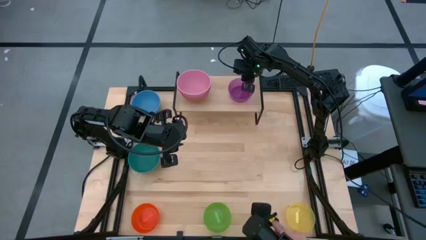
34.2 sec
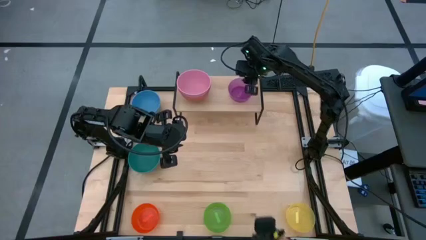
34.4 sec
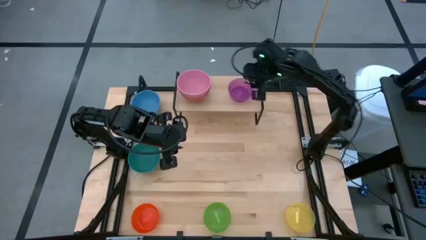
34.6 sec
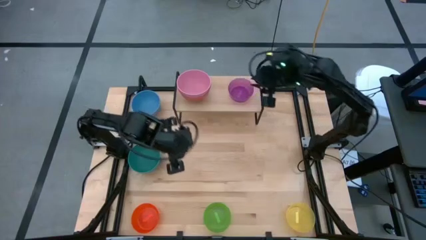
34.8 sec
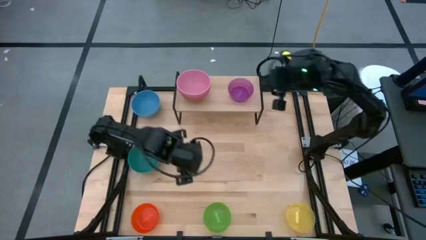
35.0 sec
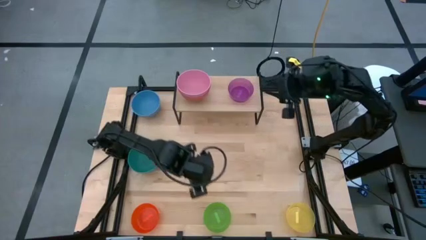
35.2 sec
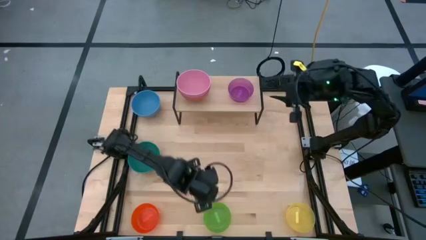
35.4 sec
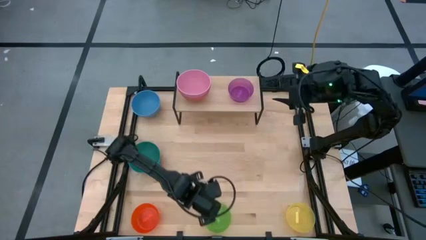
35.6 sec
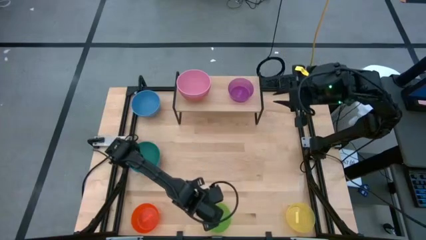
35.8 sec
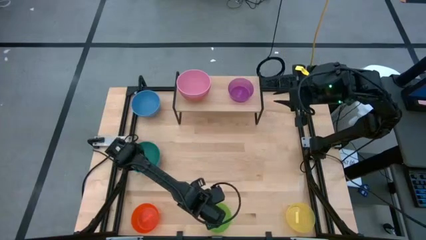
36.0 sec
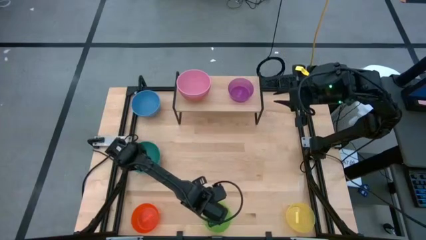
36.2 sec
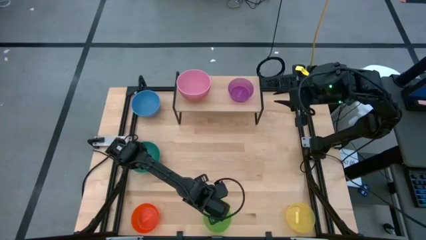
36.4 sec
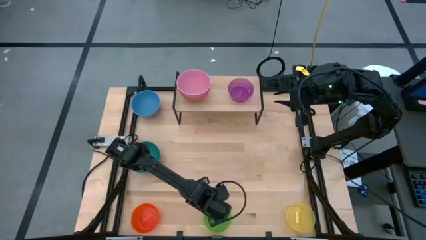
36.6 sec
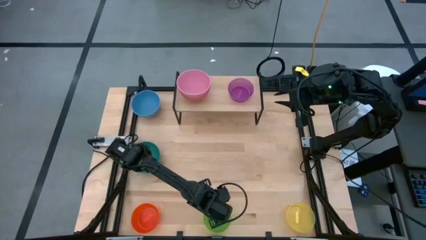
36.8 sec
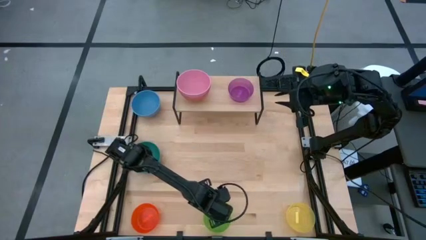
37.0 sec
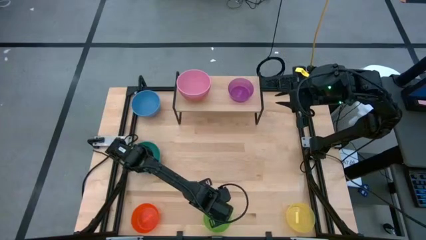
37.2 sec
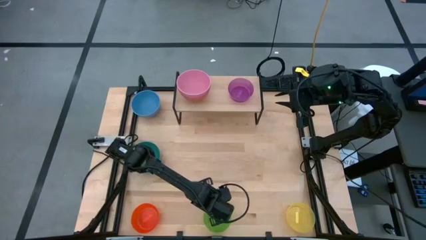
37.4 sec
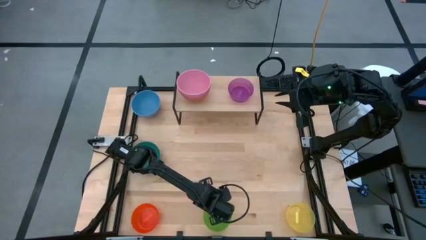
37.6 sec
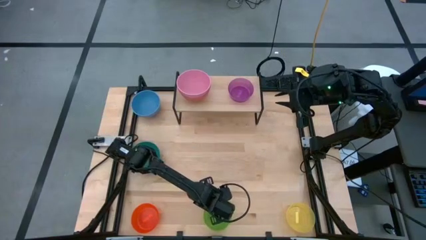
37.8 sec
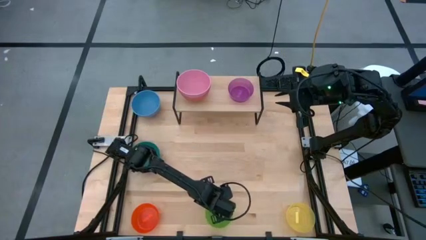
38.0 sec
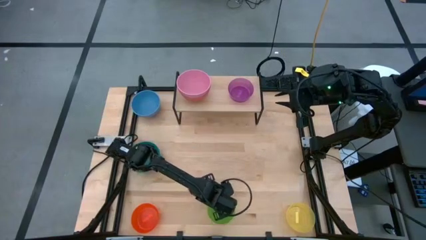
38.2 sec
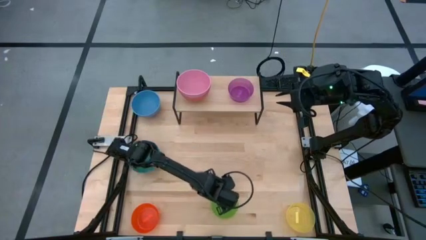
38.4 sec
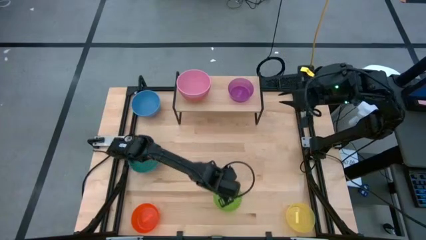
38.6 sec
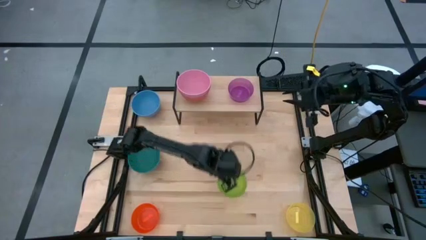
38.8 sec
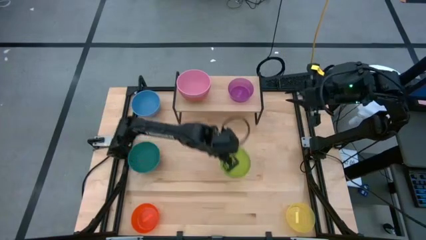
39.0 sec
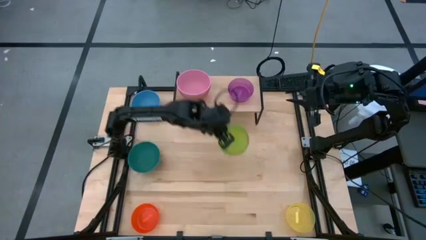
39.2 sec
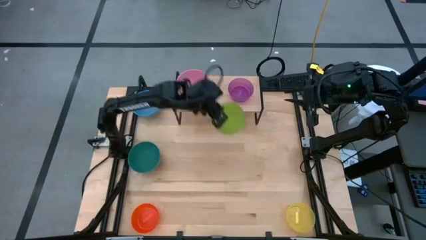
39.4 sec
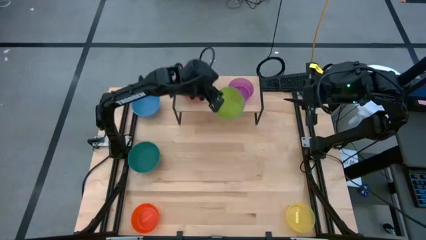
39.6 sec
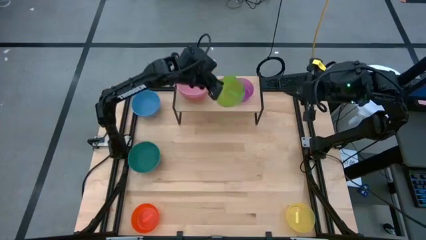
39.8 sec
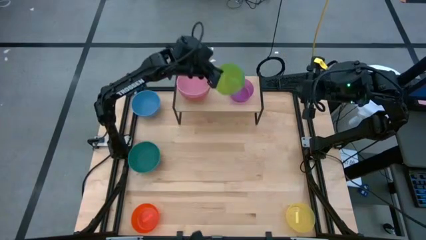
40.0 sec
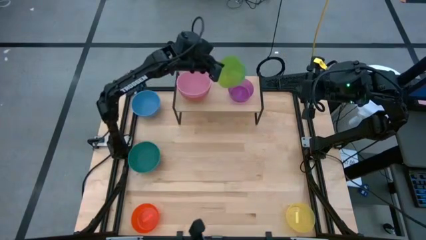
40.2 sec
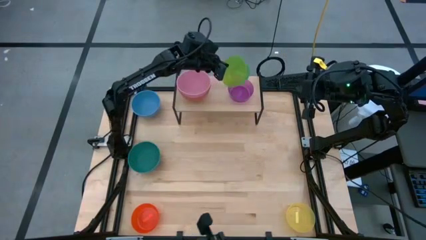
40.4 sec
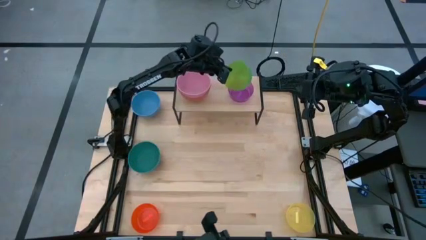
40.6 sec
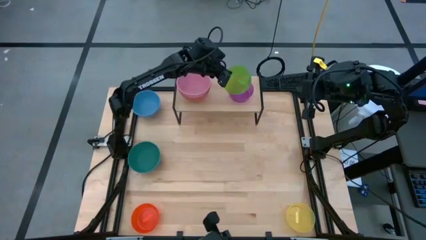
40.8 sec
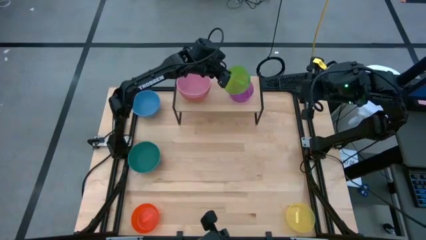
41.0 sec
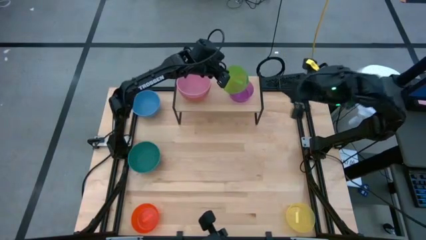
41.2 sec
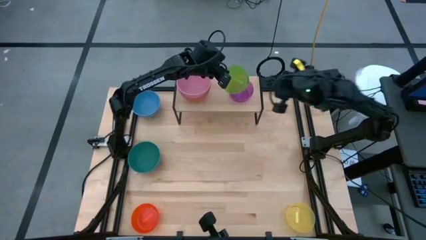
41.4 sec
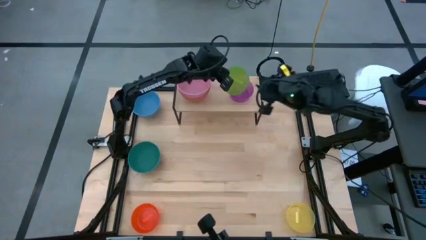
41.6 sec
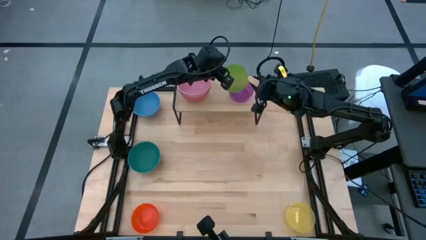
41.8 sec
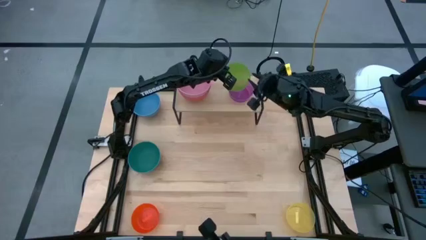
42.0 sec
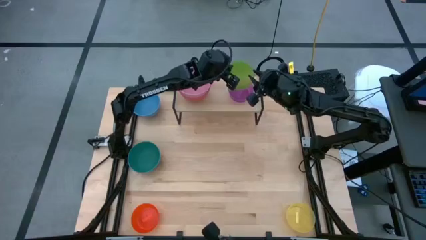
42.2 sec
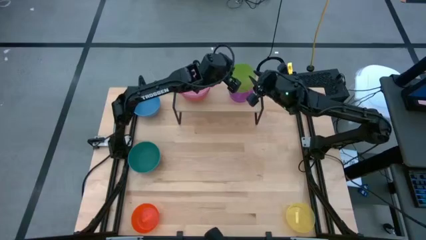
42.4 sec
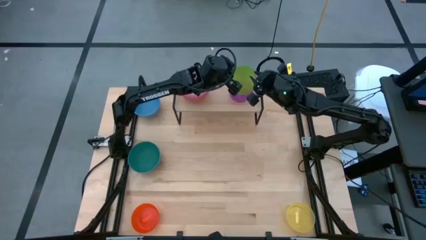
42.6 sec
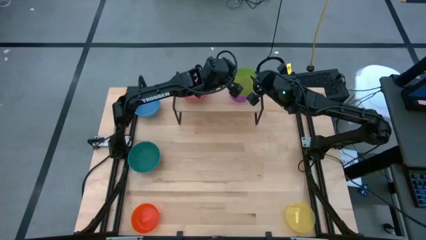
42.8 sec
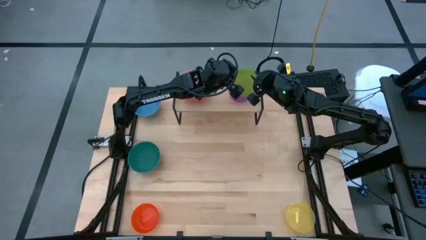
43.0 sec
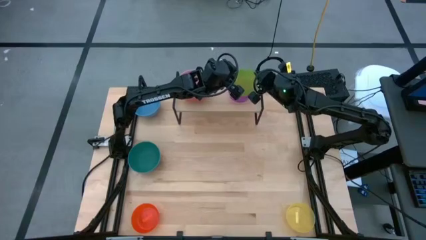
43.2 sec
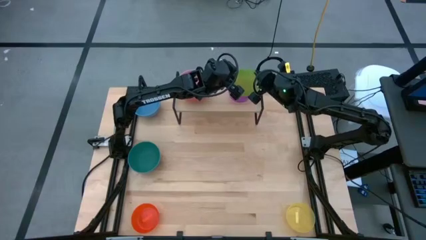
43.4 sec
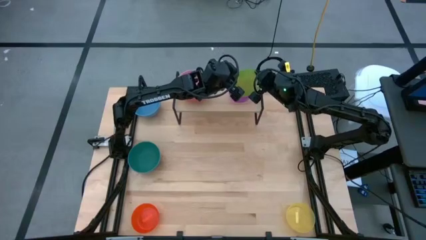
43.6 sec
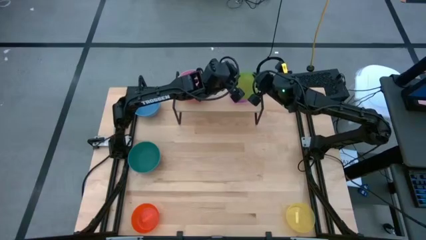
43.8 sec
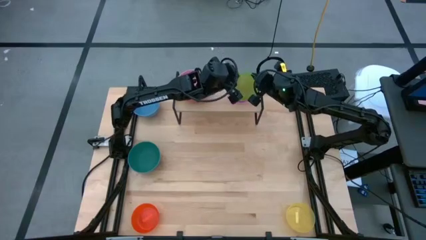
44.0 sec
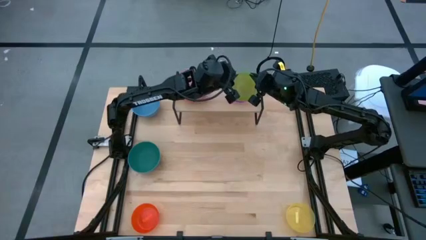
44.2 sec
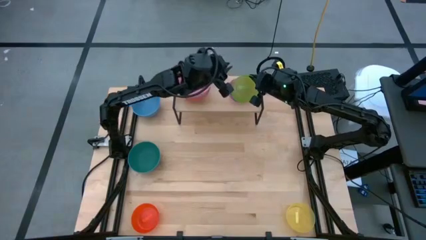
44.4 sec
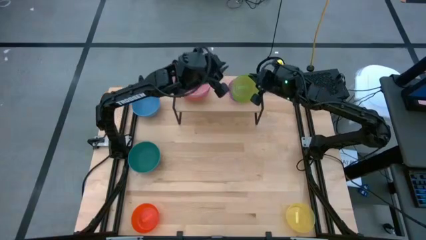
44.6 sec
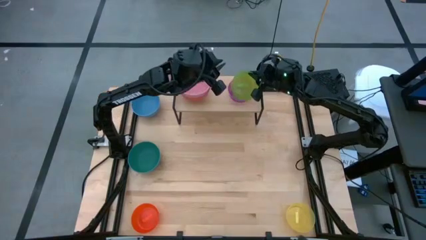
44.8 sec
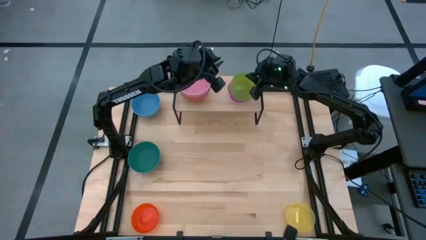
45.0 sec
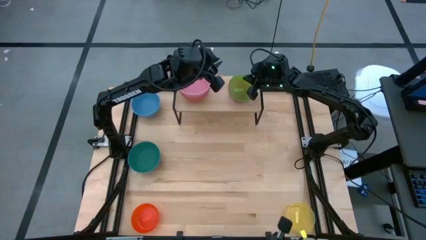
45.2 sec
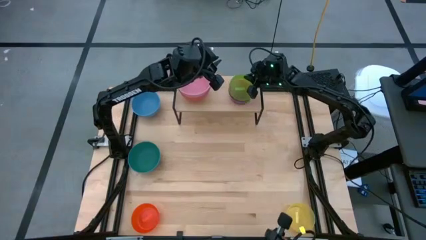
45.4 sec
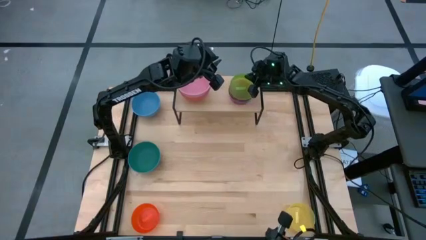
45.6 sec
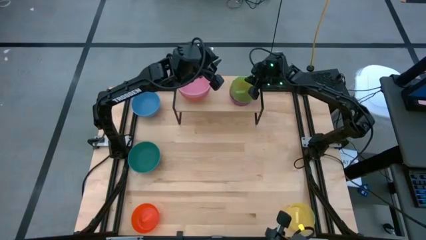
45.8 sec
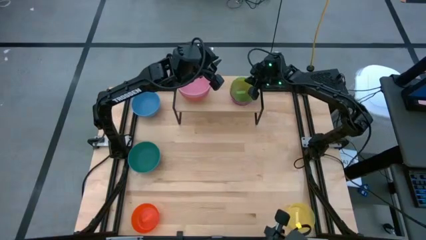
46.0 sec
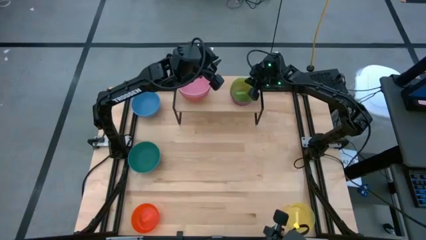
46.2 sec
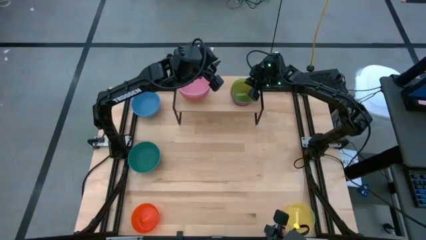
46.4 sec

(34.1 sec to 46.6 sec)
Task: Place and stack bowls onto a shelf
Stack the green bowl on top of the purple bowl on the shelf
